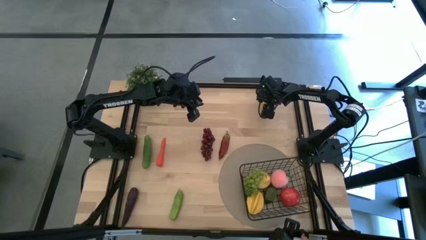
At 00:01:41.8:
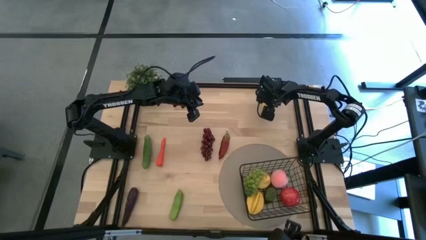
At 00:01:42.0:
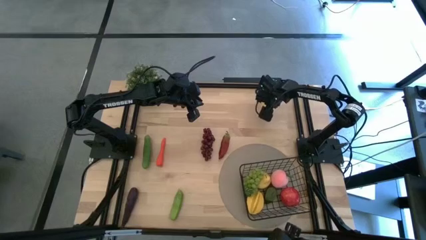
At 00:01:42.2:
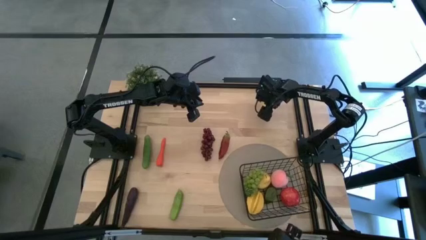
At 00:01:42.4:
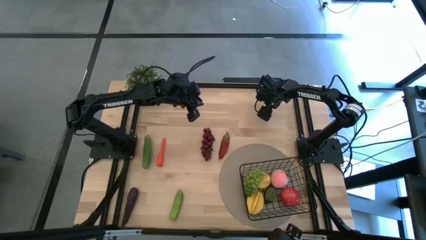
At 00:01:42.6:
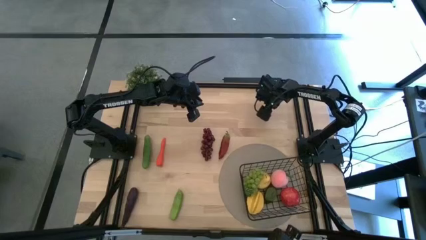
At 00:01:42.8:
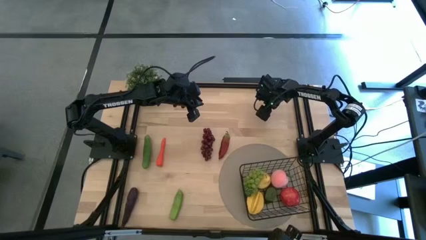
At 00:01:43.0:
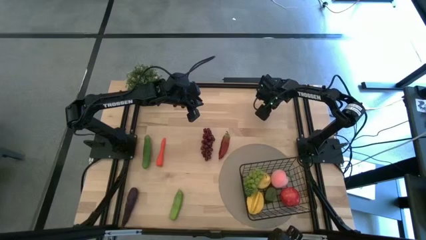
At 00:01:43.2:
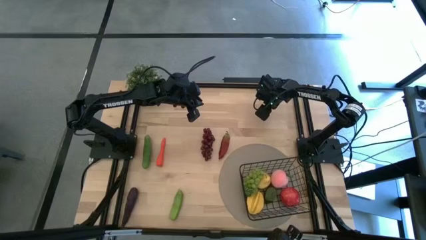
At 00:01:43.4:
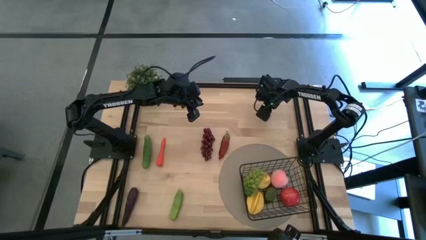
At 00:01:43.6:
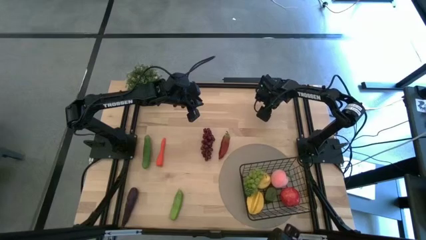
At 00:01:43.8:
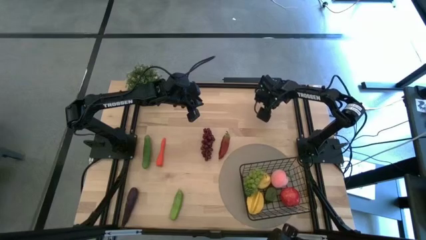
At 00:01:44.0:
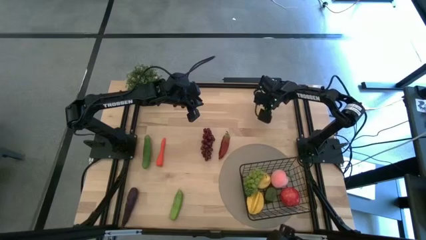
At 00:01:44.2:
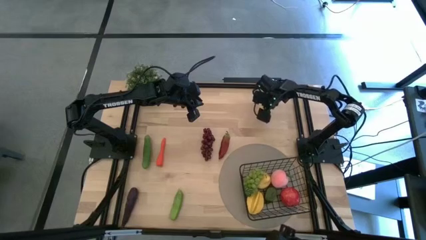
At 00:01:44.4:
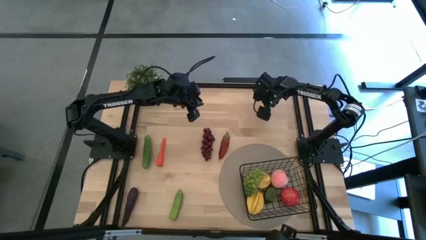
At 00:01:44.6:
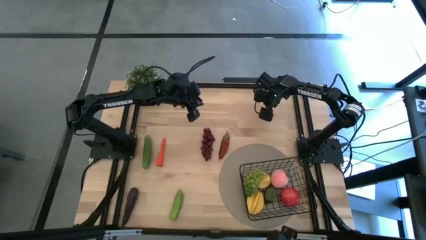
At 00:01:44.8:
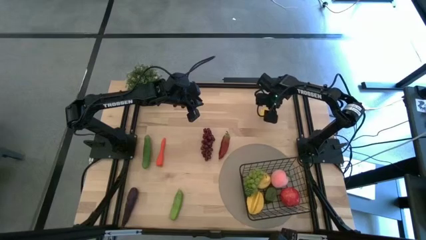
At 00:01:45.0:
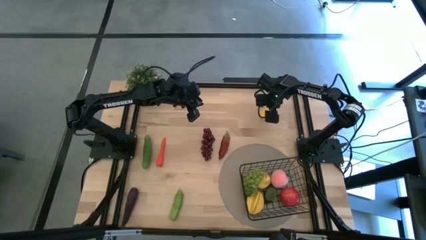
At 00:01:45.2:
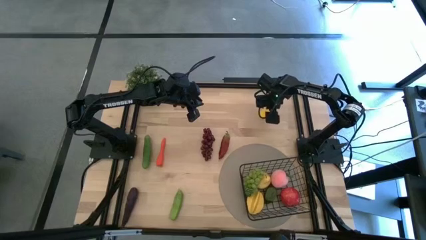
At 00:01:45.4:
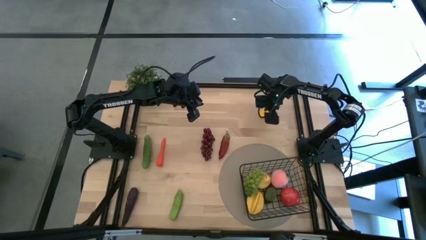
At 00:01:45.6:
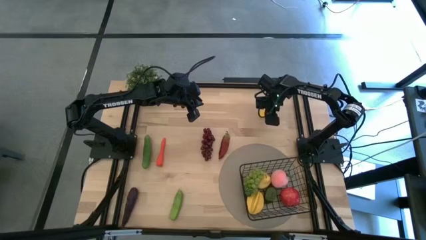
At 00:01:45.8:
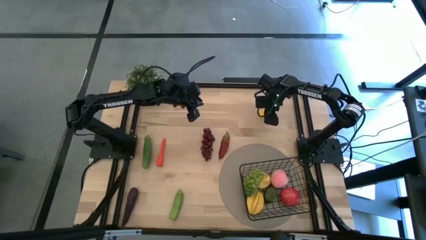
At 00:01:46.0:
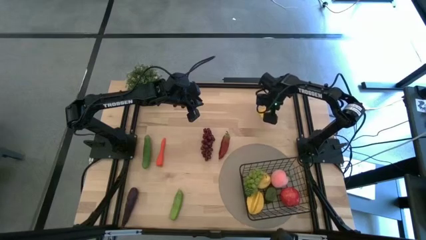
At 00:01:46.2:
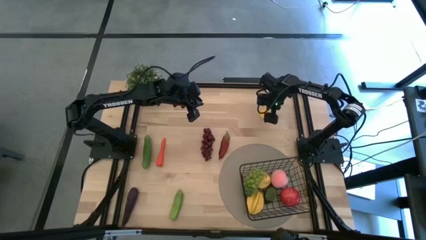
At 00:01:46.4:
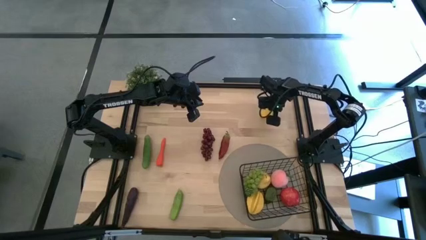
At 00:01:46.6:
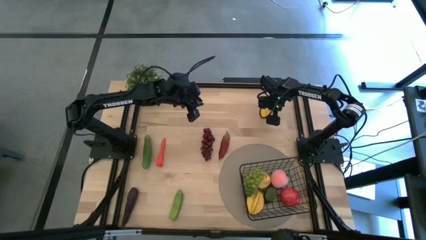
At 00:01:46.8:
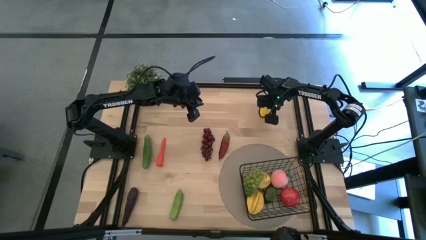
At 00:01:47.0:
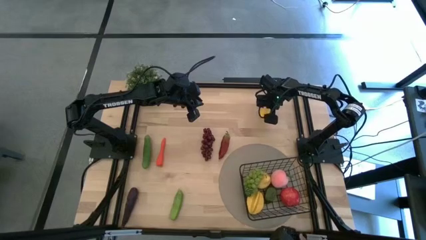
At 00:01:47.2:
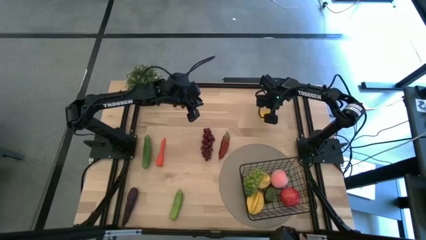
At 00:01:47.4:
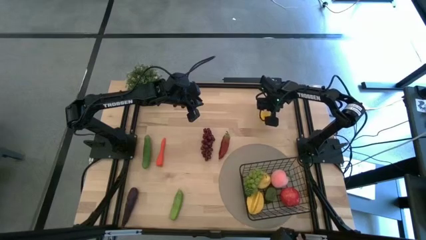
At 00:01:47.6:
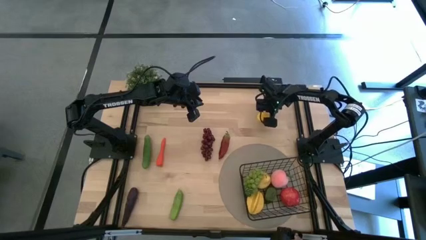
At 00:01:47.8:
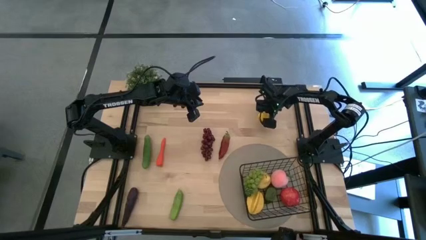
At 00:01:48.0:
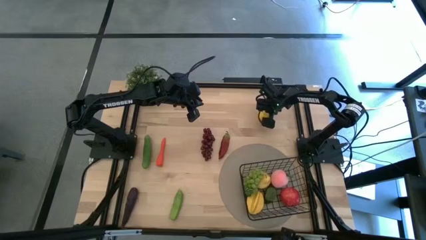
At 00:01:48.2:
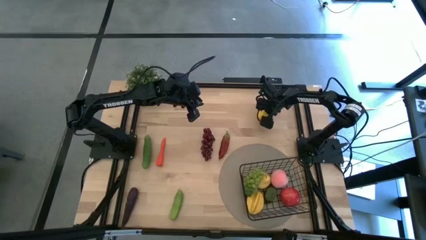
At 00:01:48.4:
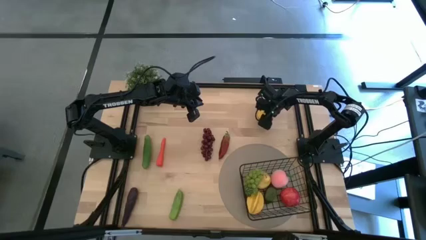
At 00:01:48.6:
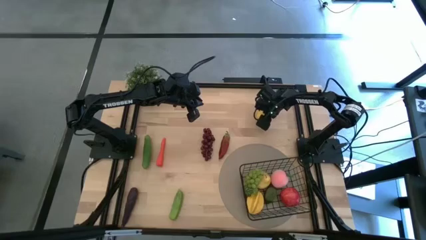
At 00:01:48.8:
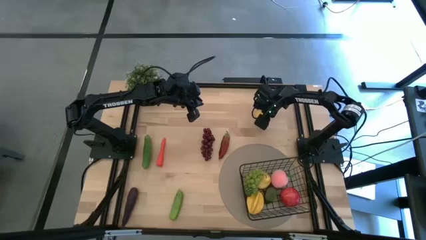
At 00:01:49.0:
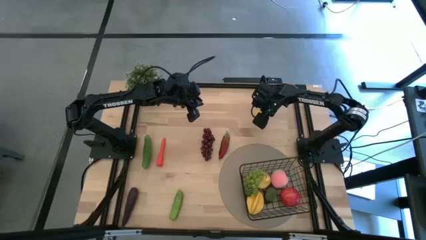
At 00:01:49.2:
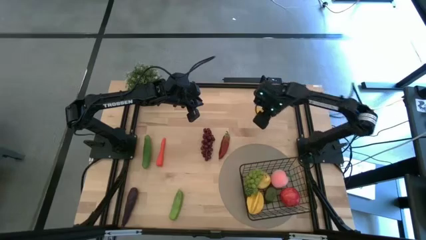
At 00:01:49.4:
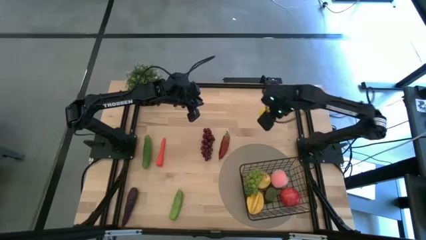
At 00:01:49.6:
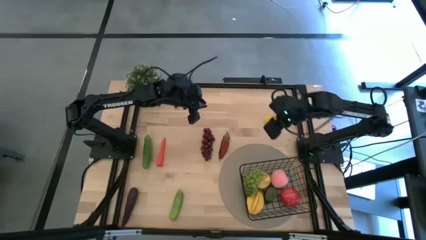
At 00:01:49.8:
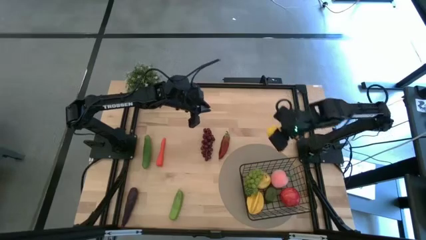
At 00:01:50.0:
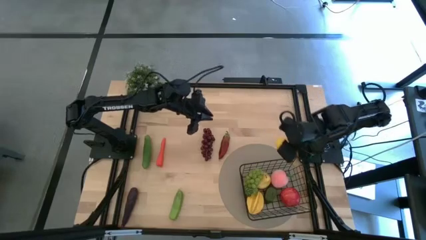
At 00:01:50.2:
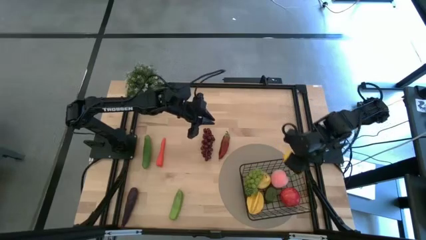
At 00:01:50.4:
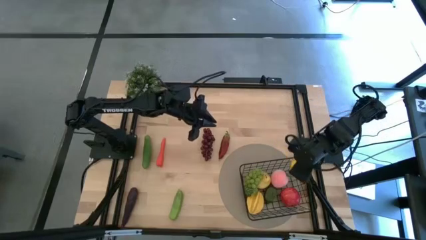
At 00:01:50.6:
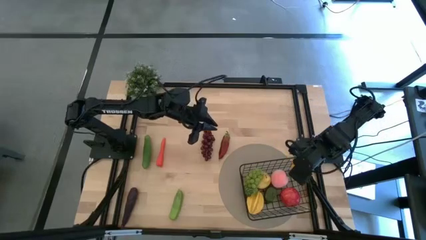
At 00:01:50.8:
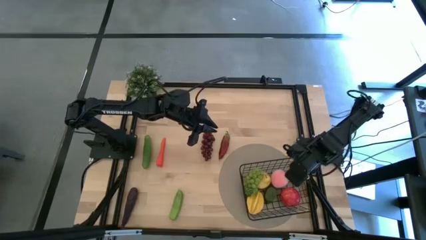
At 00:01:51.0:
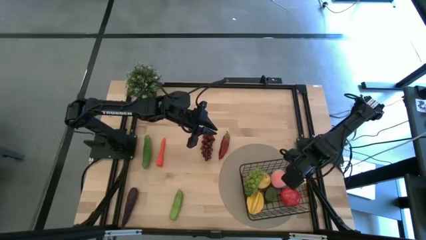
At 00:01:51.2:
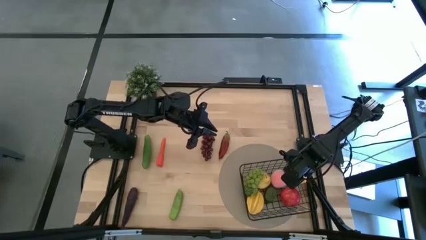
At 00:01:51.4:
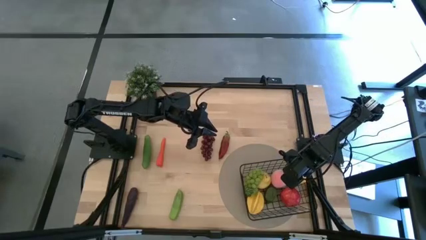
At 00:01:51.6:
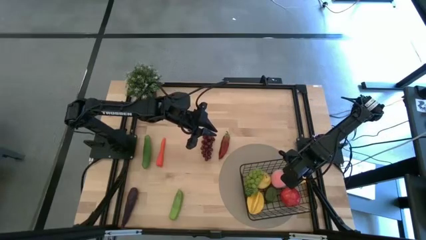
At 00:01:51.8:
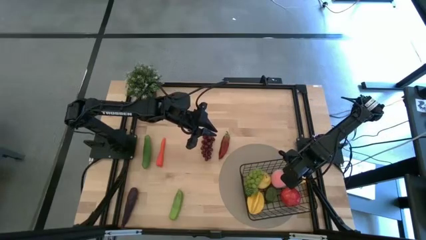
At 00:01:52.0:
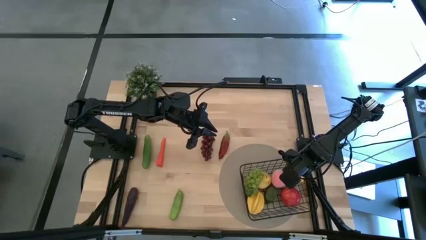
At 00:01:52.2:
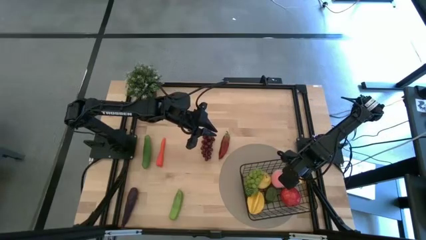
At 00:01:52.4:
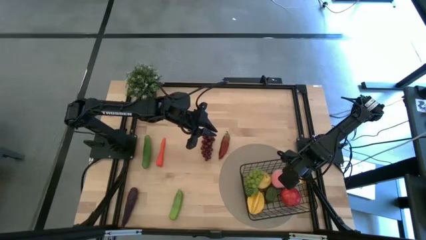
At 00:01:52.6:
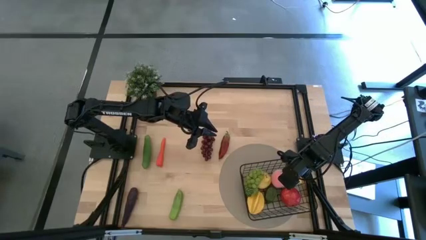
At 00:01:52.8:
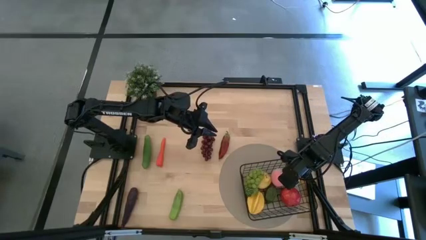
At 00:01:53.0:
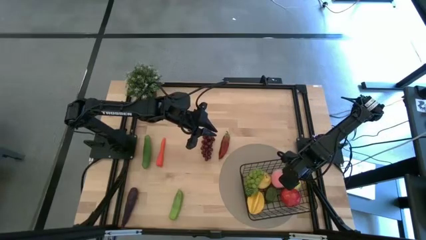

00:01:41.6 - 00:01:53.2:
Task: Build produce basket
Put the lemon into the wire basket

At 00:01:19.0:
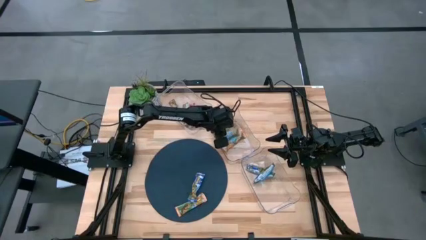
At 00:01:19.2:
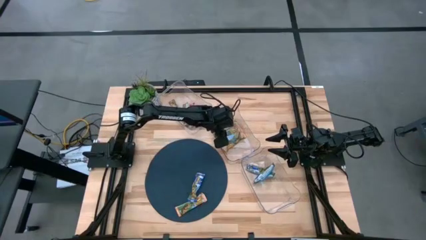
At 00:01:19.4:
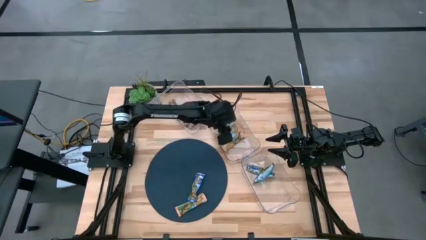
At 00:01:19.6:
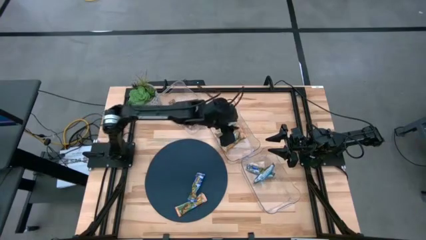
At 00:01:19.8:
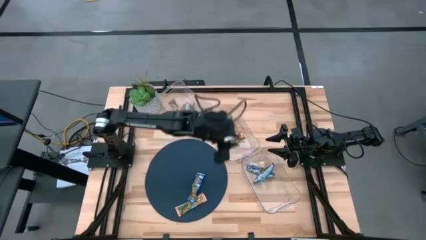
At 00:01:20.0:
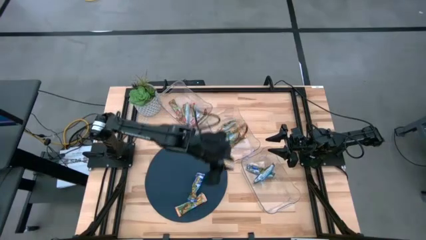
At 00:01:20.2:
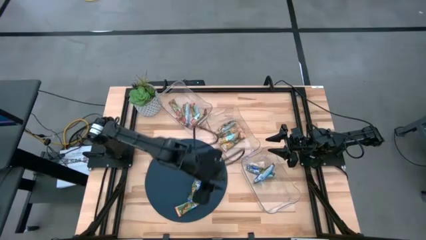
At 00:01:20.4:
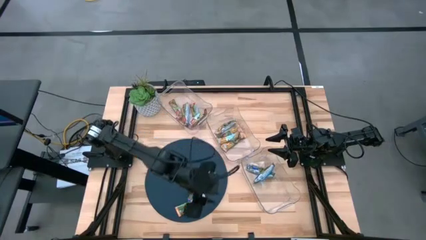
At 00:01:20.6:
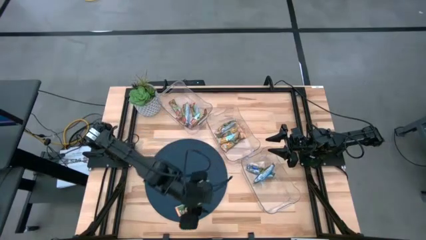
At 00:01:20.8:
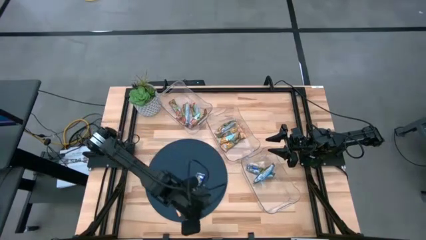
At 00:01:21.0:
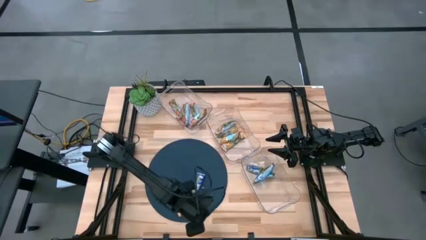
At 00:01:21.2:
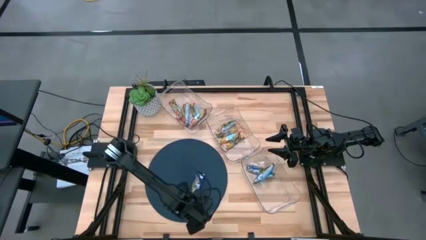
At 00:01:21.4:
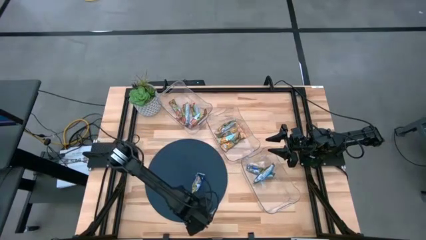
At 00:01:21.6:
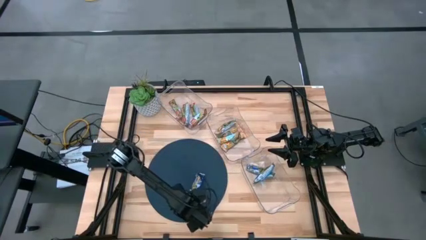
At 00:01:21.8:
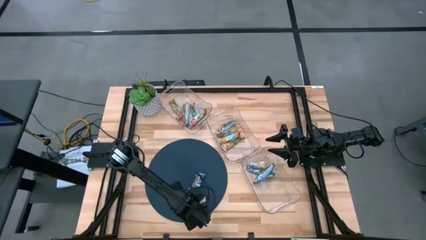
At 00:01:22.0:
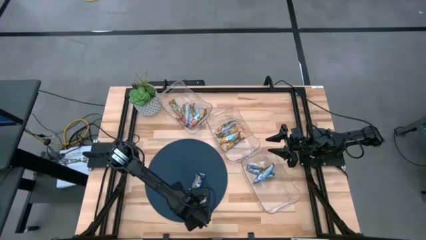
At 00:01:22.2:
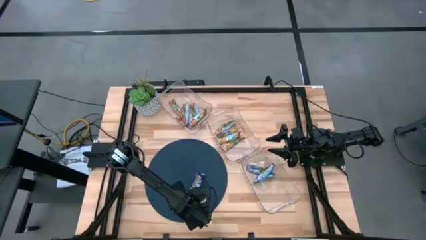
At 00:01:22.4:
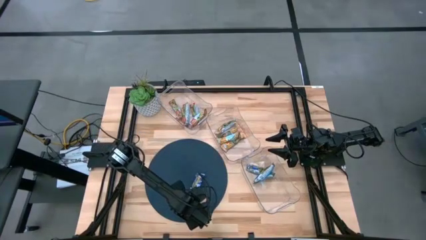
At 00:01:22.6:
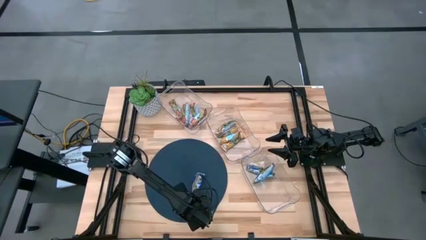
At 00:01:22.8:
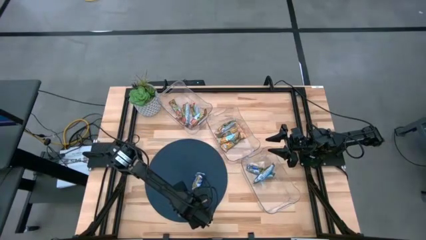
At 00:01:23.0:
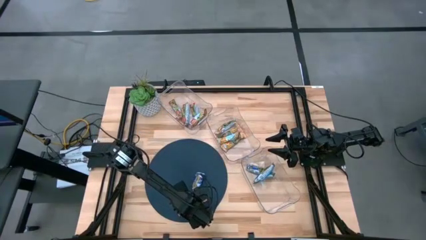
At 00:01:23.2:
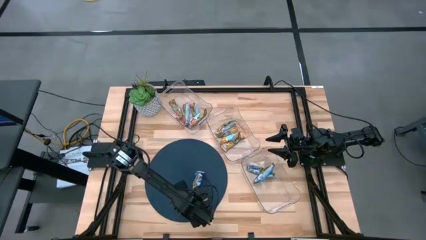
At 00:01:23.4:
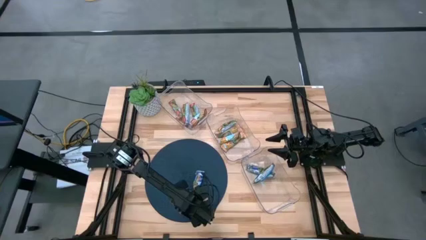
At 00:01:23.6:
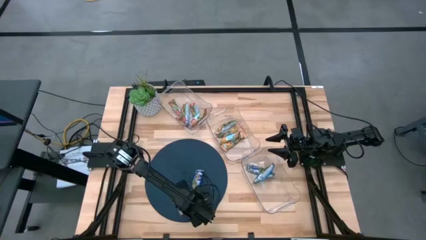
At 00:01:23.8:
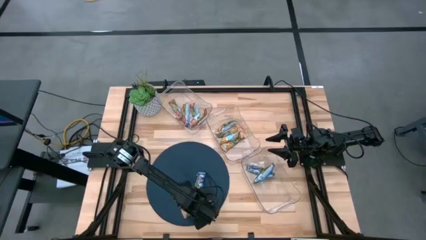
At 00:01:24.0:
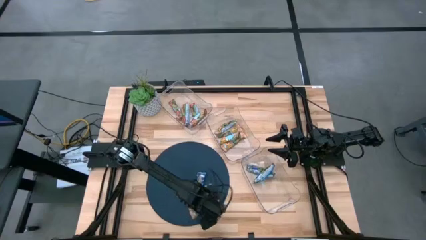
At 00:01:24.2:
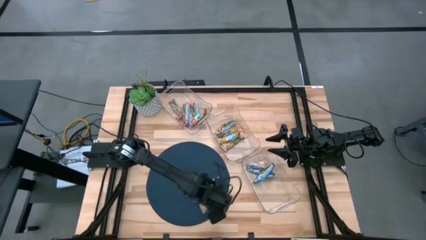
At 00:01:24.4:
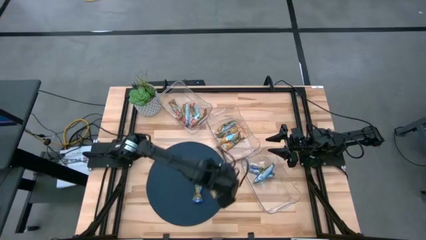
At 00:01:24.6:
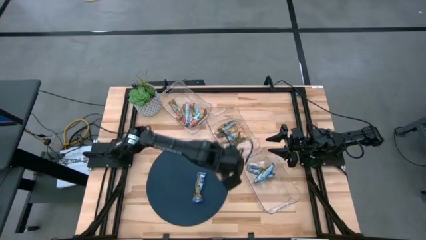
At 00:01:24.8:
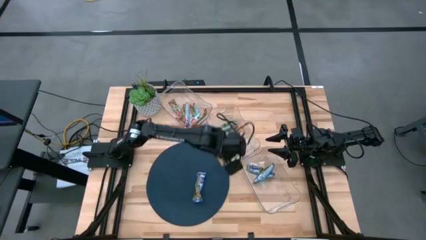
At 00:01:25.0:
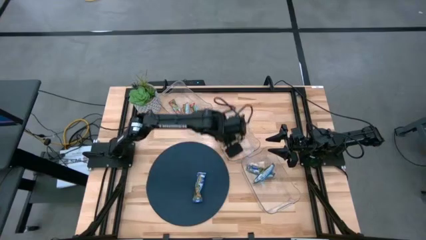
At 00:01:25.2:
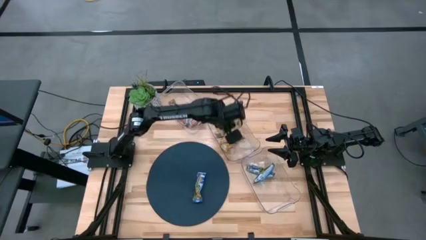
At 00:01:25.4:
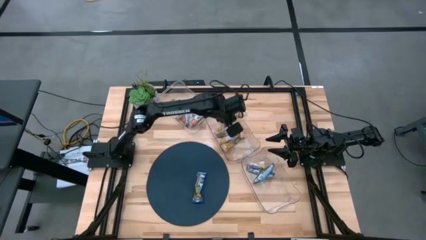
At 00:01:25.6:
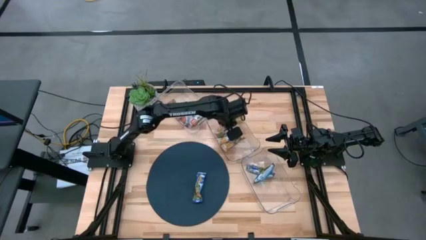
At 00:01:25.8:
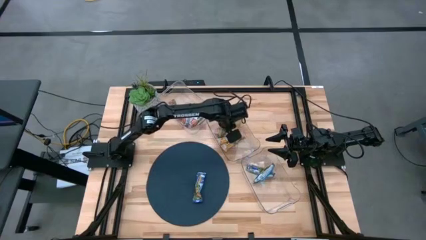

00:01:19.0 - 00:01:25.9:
Task: Pick and place Granola Bars by type
Put the yellow granola bar into the middle transparent bin
